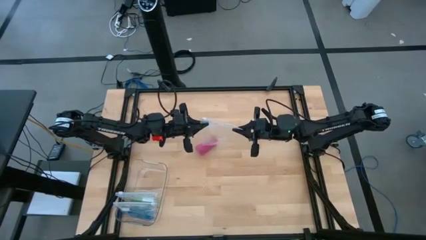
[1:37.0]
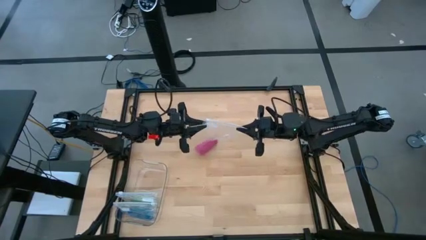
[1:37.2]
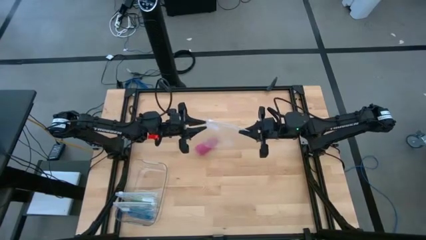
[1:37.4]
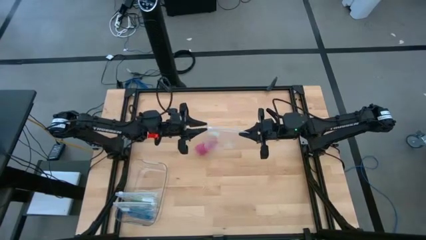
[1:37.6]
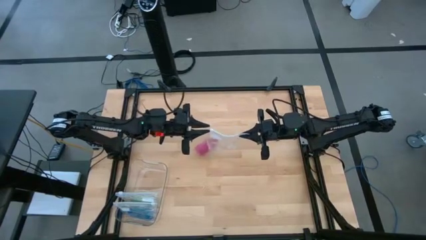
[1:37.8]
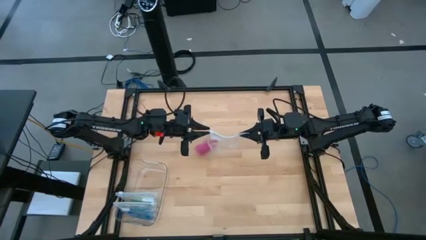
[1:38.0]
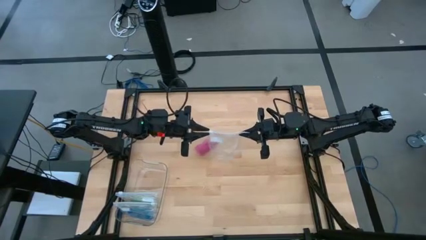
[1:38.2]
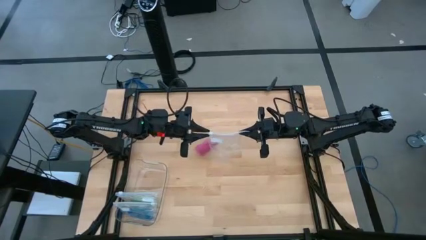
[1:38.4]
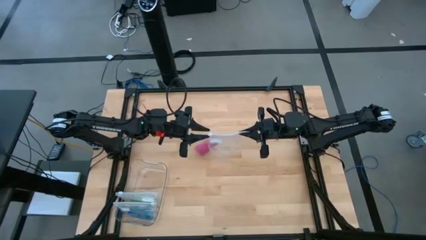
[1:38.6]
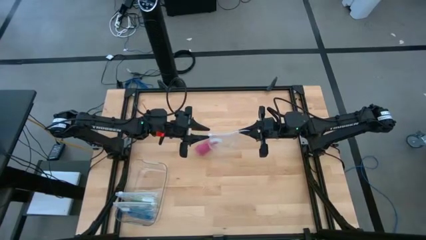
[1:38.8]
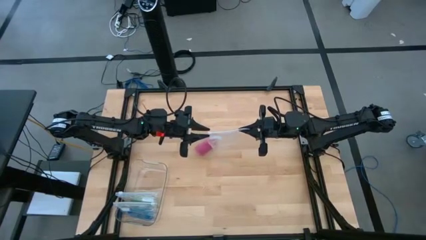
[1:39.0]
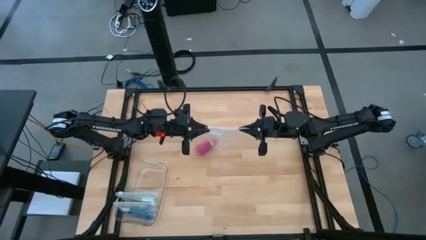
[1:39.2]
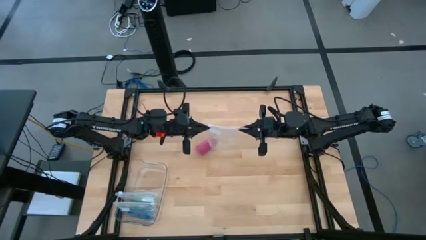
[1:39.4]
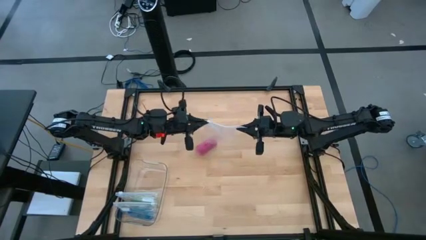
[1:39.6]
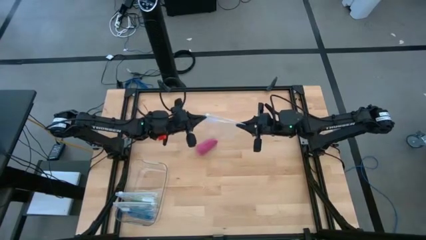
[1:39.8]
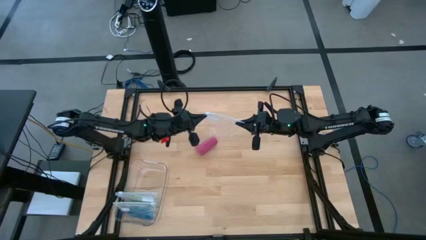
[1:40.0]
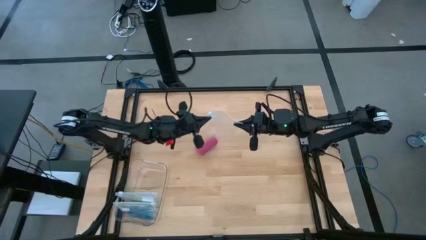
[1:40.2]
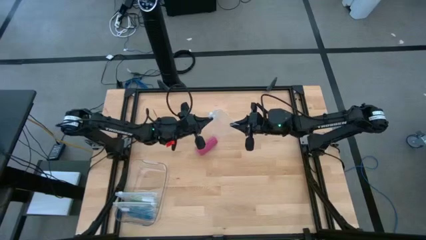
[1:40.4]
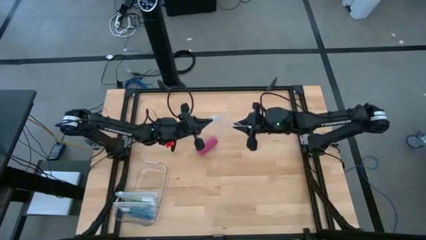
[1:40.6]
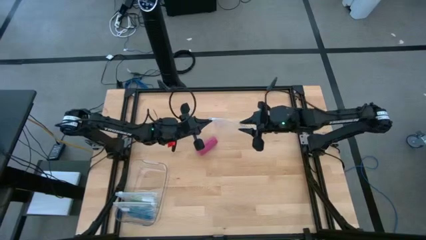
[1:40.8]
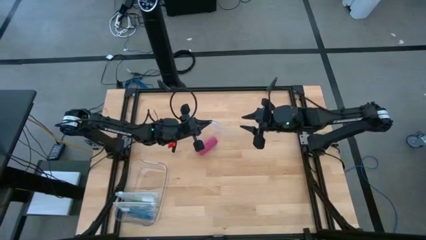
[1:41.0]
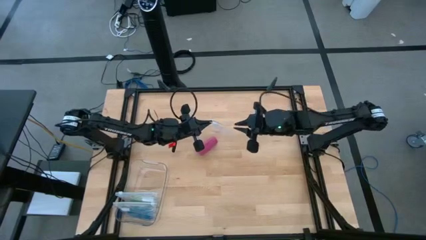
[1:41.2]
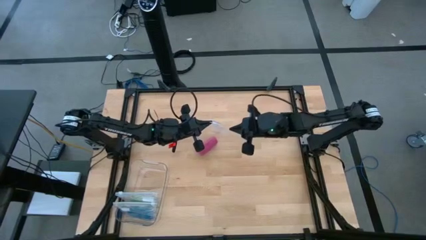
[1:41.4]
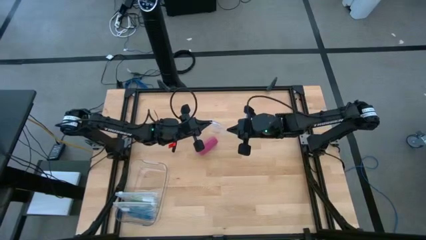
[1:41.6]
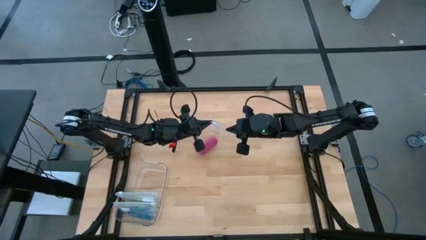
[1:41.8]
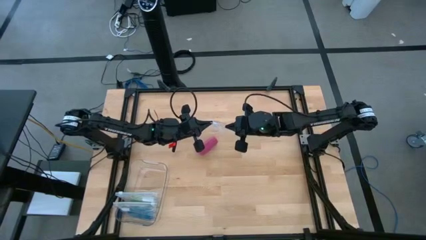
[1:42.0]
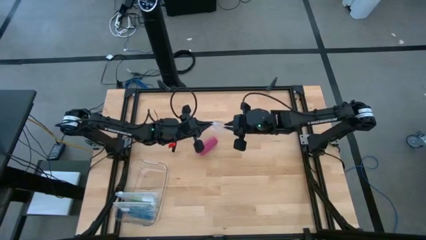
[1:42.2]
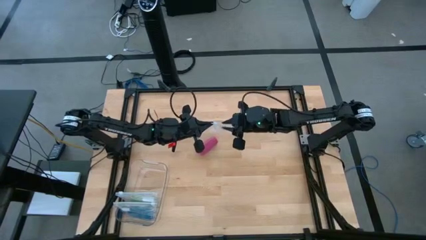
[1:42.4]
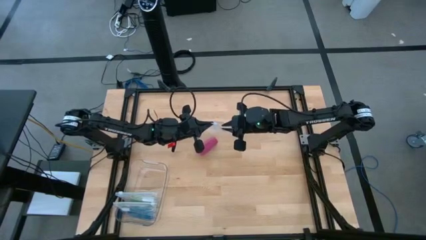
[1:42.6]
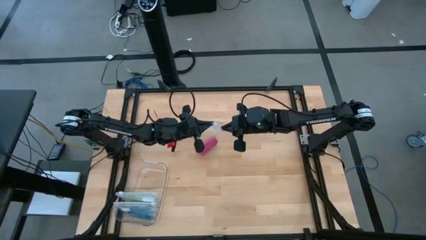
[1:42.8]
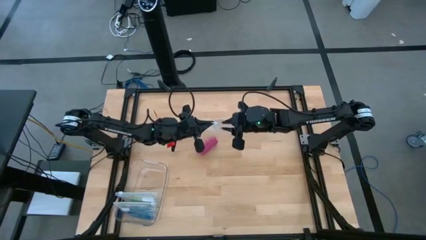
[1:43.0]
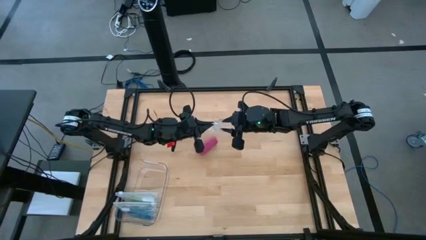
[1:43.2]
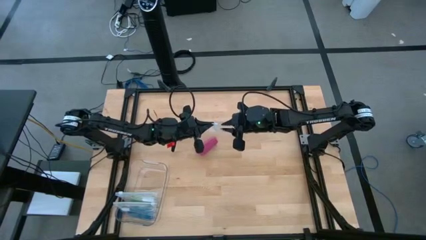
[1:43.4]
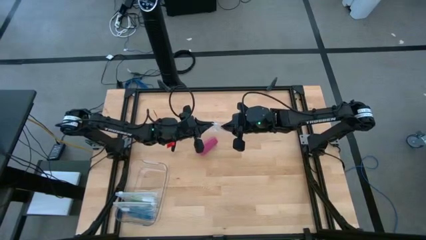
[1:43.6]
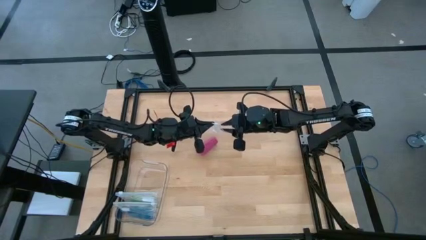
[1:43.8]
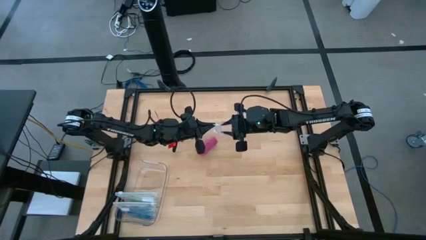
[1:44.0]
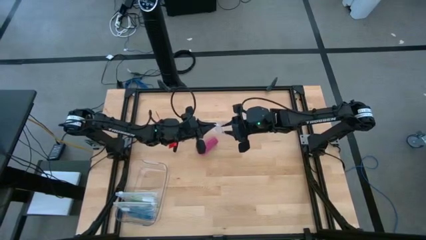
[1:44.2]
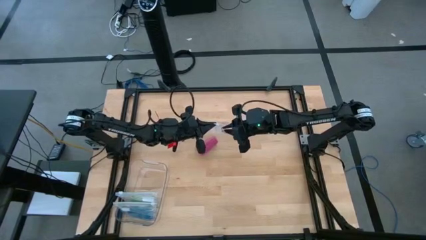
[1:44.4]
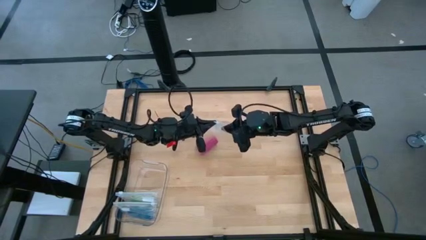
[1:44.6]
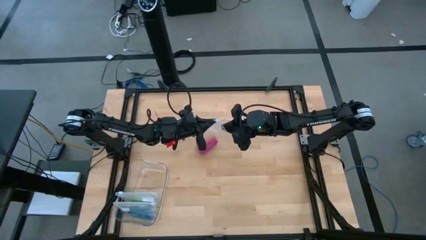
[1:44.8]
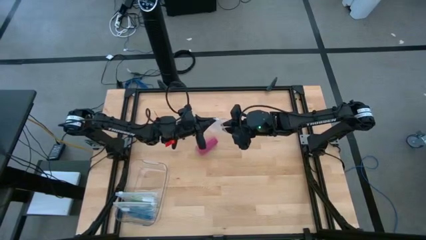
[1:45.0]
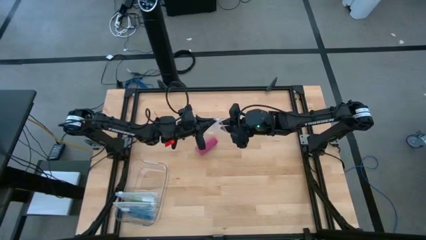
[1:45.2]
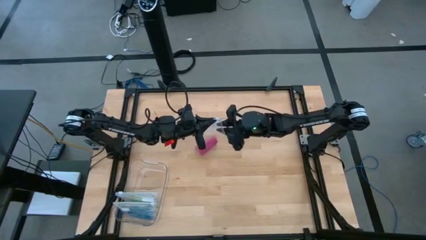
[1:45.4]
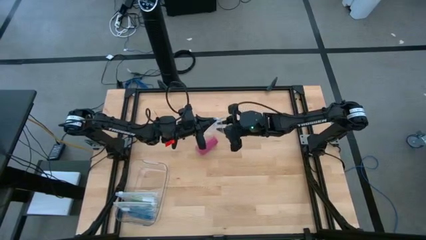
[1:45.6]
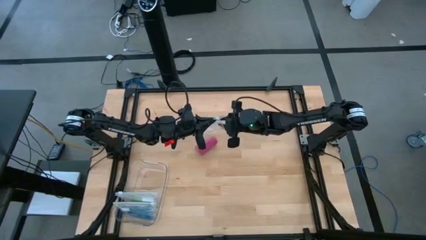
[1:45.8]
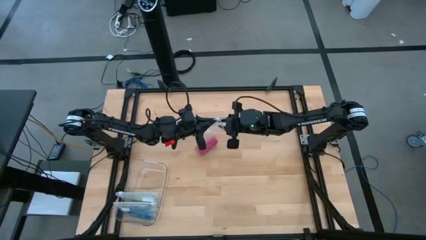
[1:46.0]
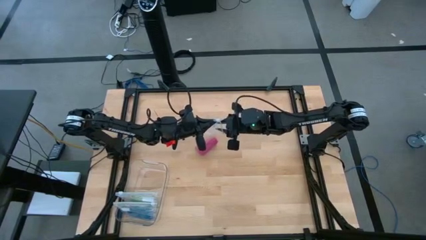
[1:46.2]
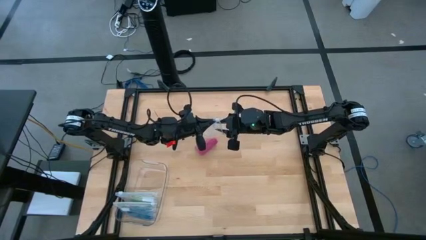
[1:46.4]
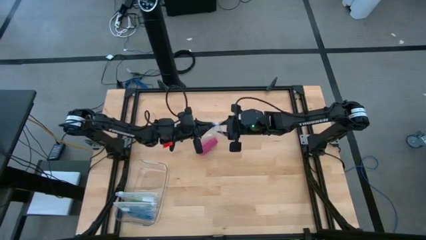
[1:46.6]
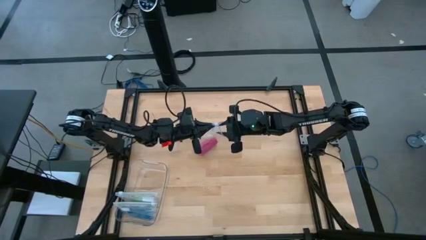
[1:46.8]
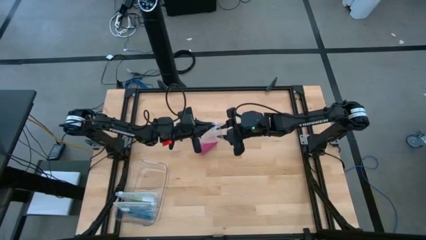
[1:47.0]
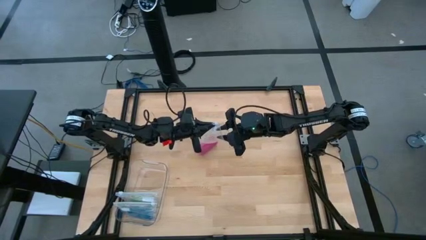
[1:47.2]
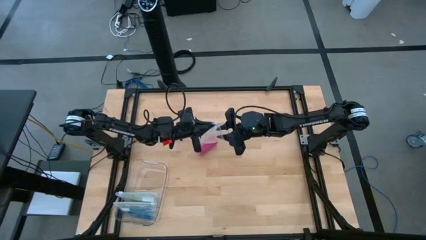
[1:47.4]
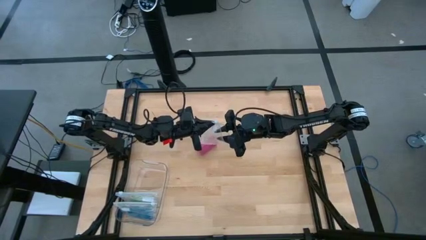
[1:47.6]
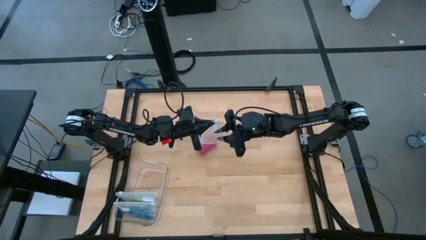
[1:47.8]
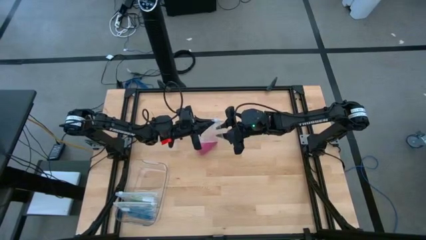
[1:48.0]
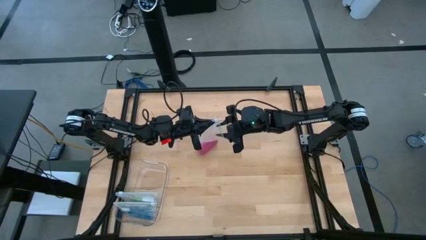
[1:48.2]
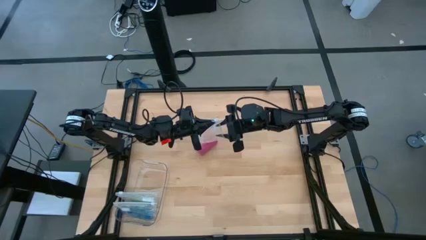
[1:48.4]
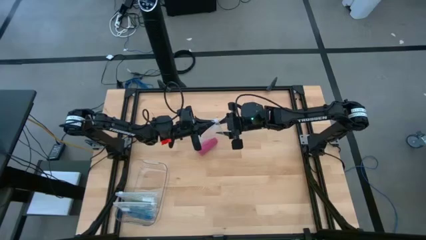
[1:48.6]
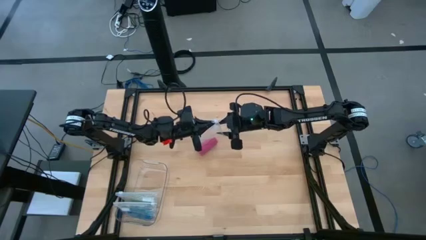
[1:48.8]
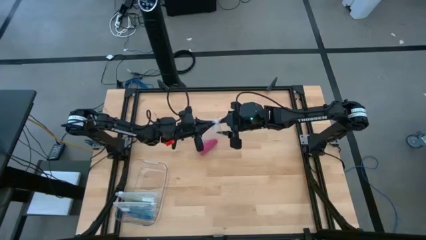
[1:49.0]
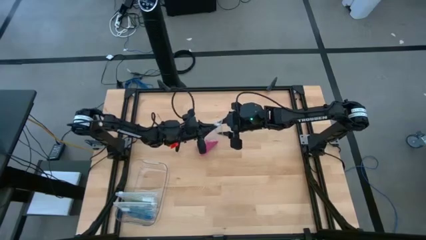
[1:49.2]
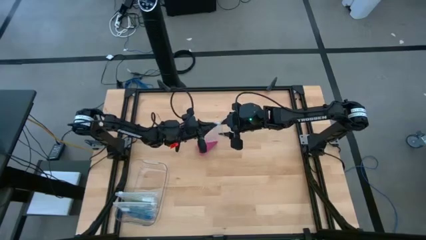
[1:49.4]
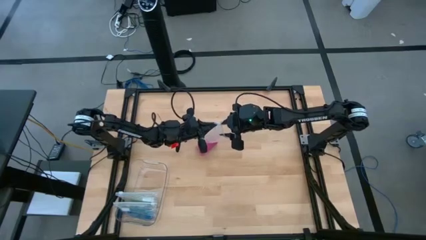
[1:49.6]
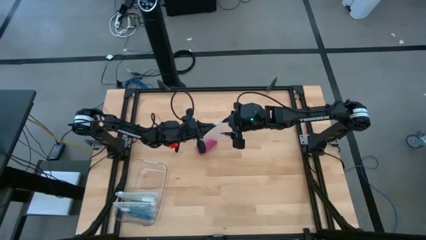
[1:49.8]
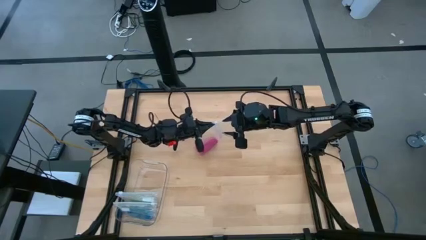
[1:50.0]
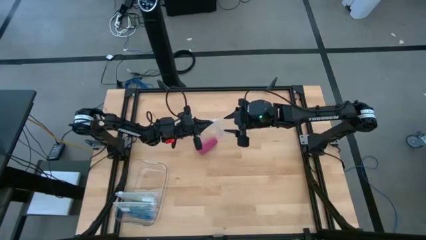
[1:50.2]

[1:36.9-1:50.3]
Task: Roll bandage
Put the rolled pink bandage into the transparent zip bag

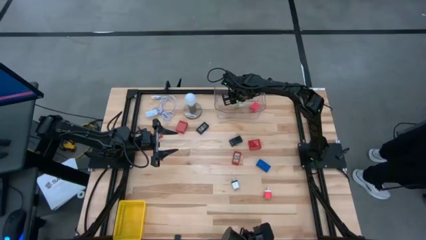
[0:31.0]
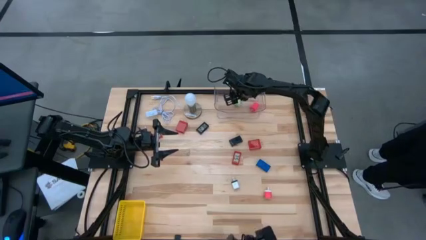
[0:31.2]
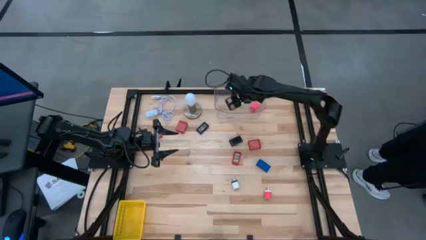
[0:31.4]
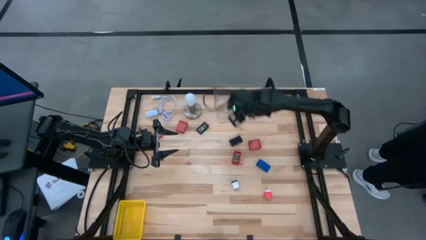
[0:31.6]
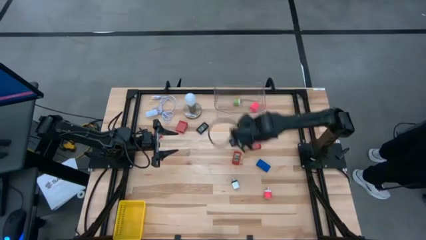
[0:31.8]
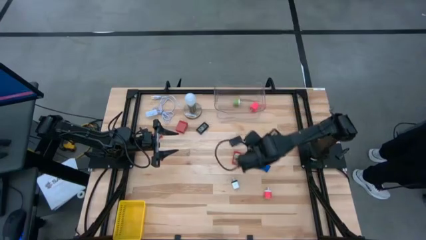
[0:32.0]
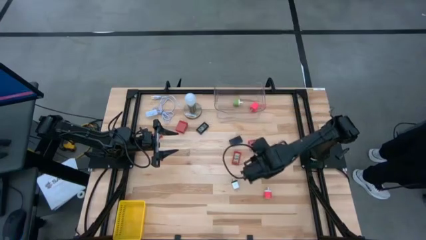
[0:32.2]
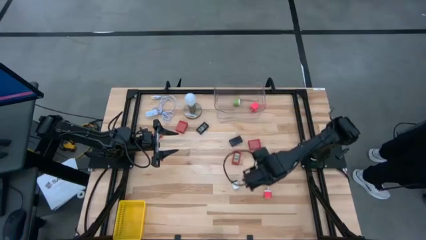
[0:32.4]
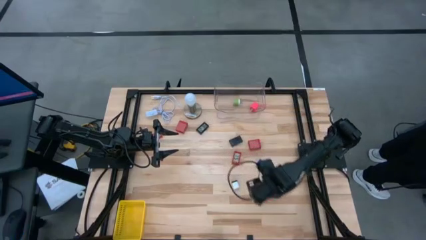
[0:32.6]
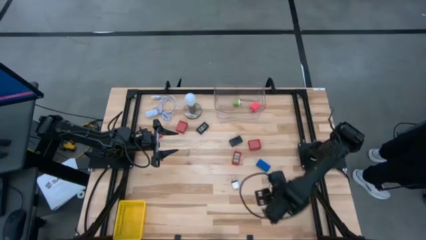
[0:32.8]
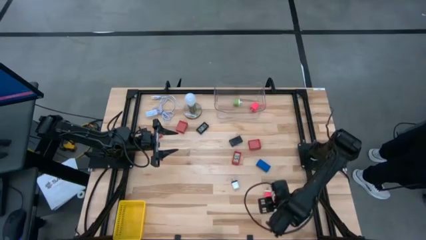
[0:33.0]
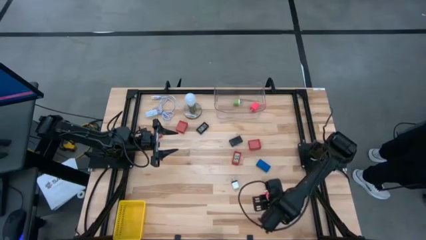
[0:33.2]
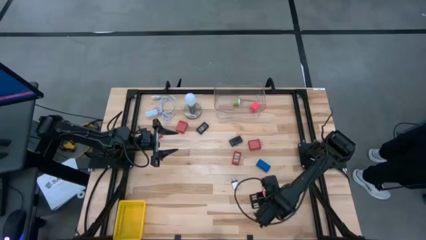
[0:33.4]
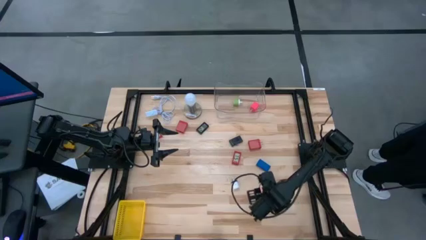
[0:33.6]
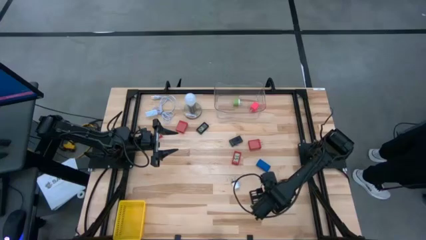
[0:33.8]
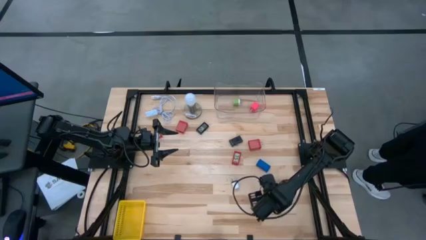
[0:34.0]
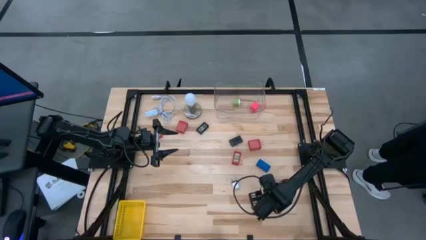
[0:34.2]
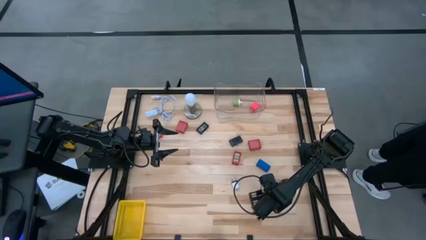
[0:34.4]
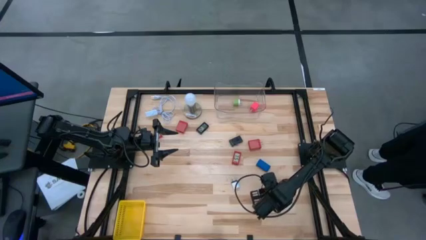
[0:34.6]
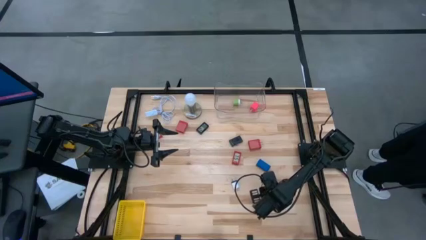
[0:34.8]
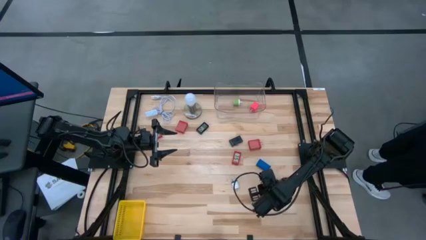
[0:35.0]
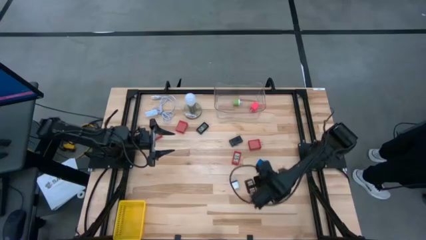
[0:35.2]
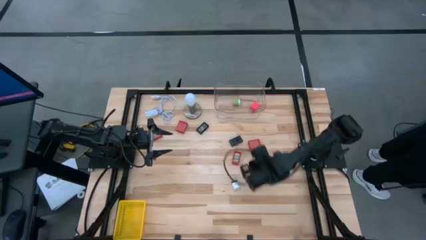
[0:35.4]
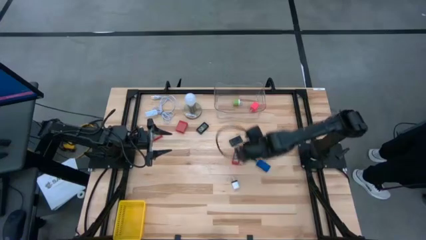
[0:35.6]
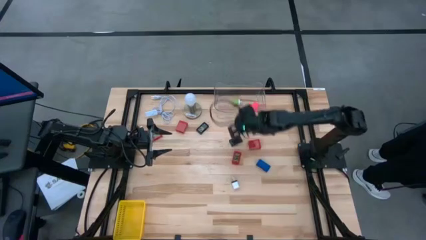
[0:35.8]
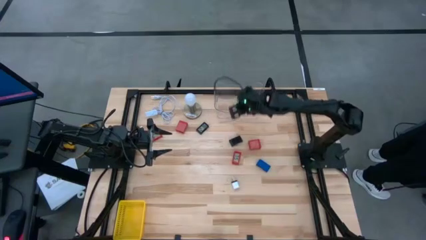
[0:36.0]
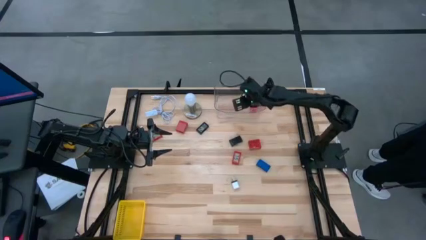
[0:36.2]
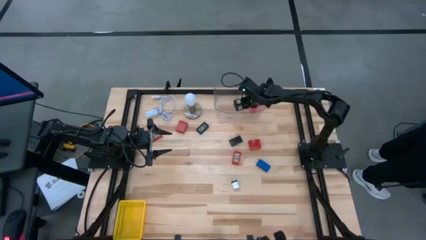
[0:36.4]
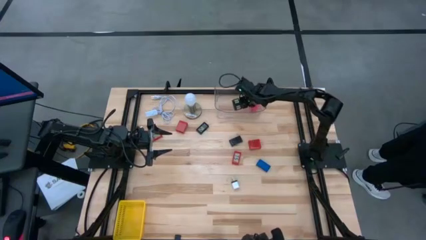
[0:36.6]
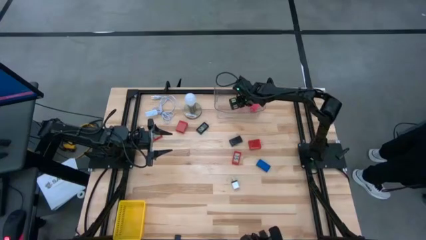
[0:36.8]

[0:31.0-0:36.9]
Task: Pick & Place Office items
Put the white and pink charger adapter into the transparent bin
